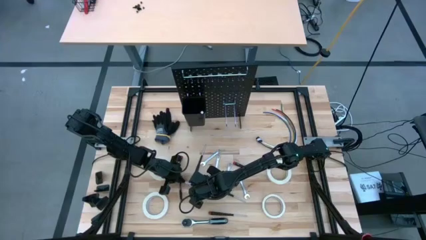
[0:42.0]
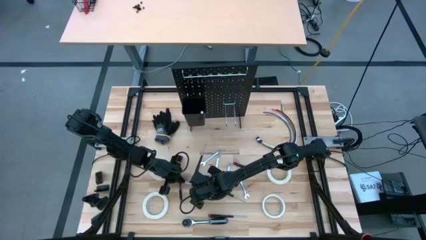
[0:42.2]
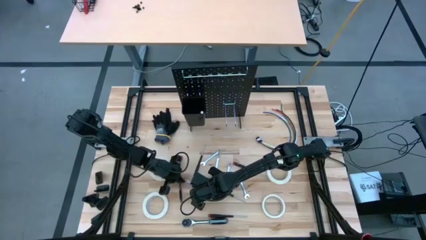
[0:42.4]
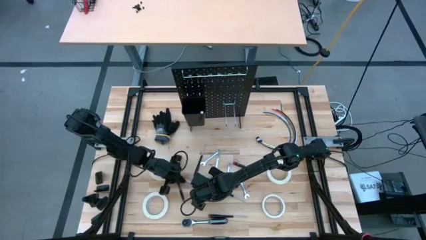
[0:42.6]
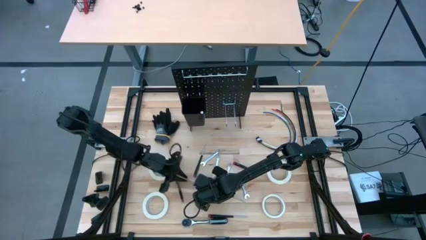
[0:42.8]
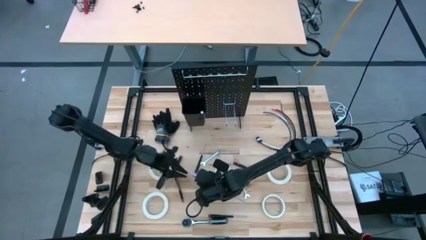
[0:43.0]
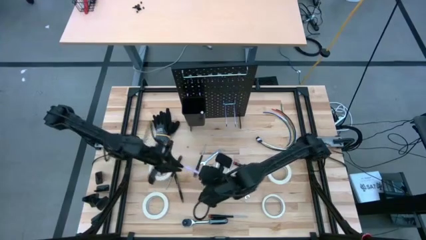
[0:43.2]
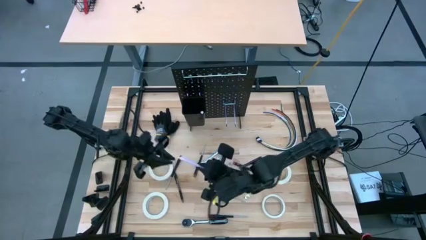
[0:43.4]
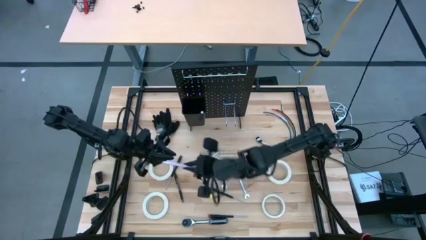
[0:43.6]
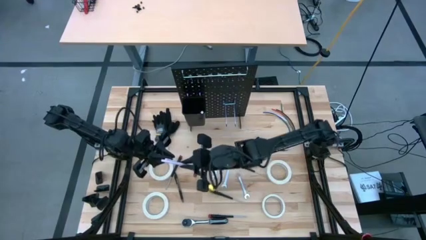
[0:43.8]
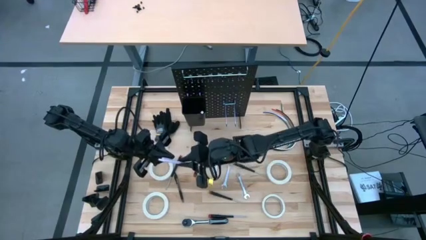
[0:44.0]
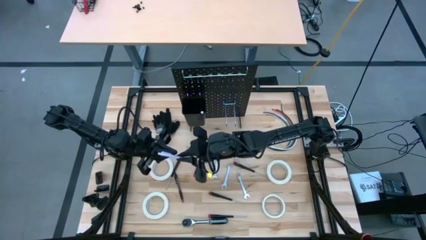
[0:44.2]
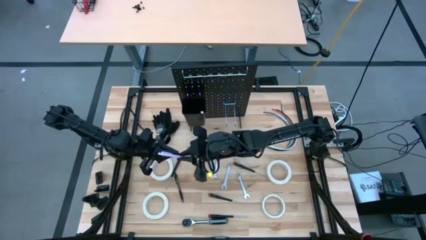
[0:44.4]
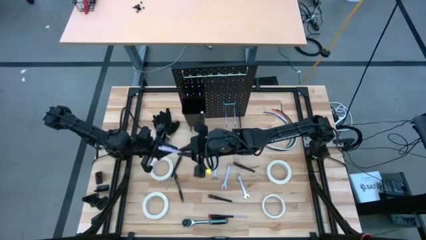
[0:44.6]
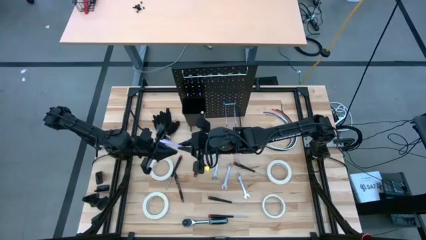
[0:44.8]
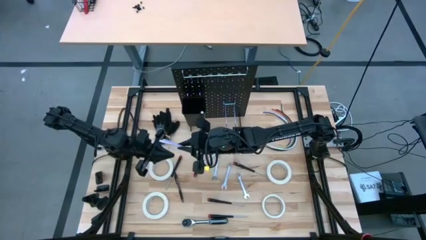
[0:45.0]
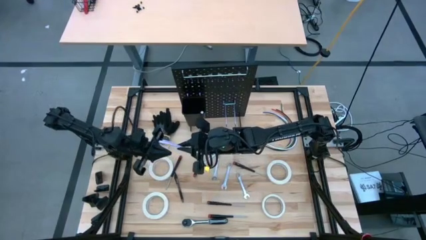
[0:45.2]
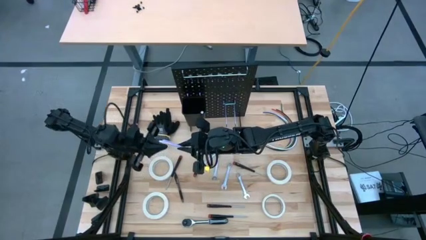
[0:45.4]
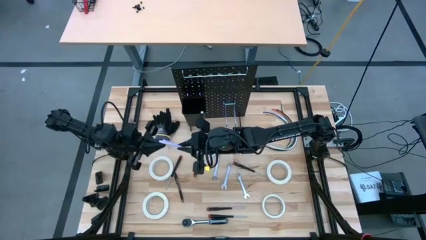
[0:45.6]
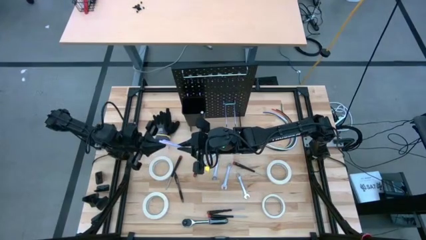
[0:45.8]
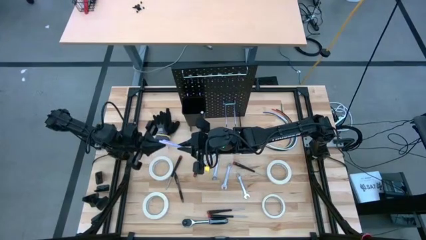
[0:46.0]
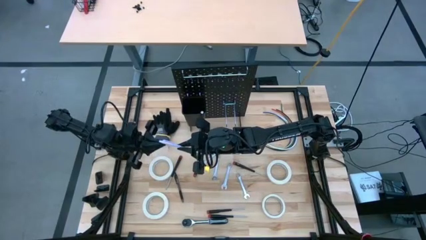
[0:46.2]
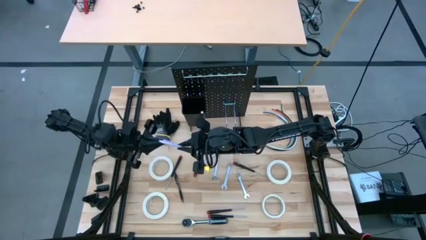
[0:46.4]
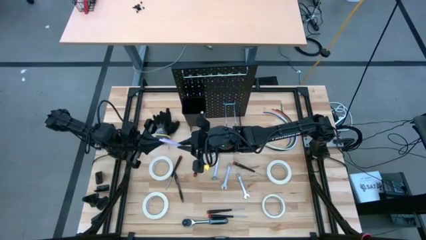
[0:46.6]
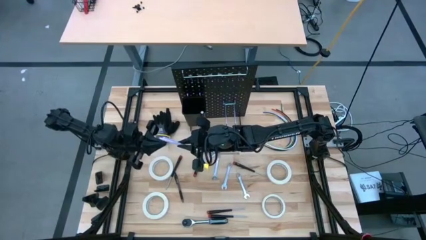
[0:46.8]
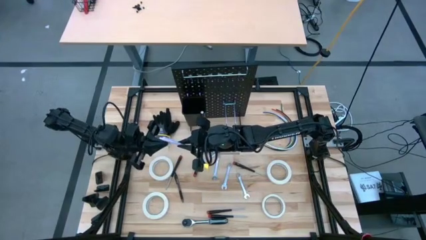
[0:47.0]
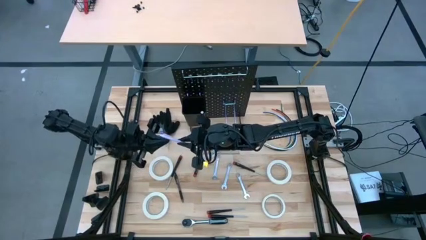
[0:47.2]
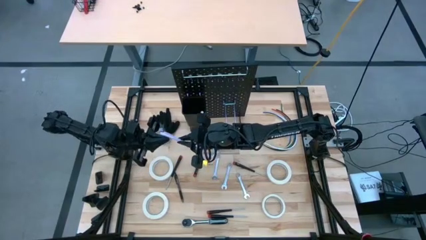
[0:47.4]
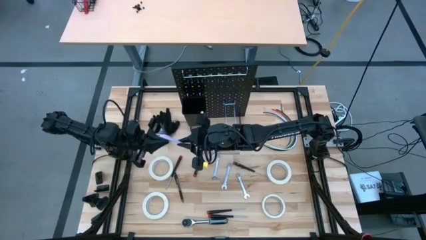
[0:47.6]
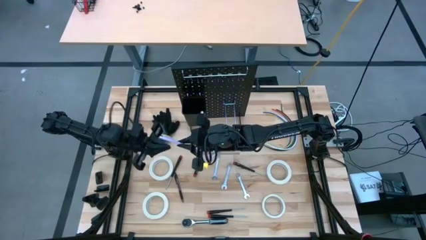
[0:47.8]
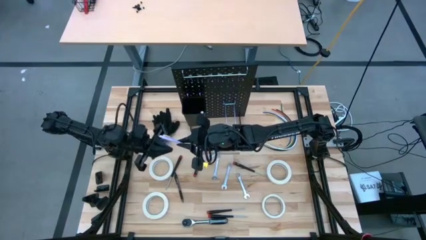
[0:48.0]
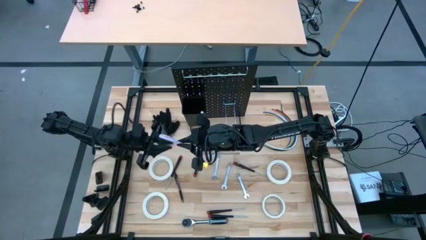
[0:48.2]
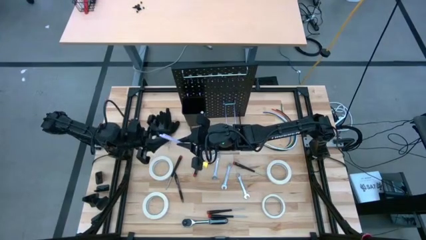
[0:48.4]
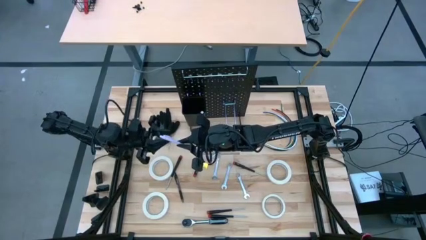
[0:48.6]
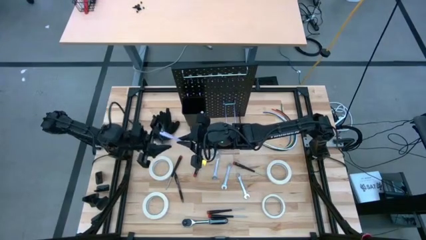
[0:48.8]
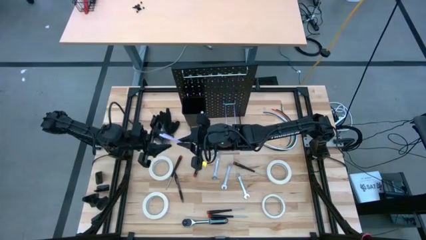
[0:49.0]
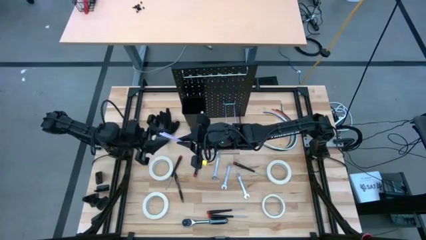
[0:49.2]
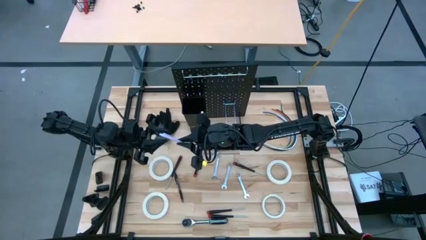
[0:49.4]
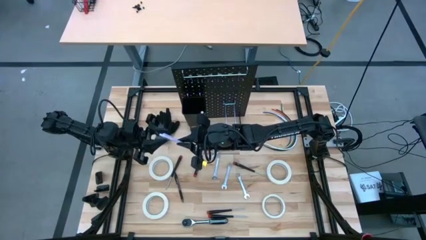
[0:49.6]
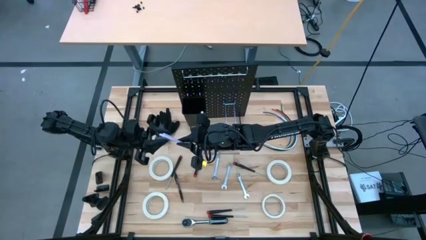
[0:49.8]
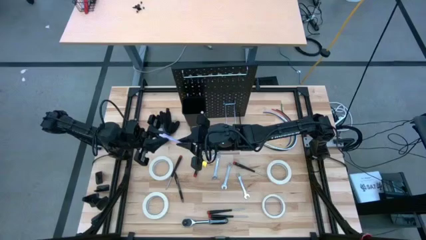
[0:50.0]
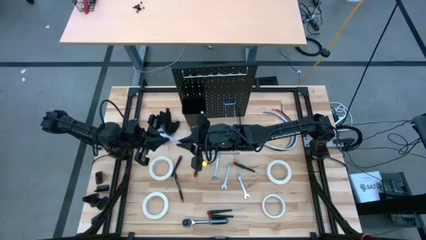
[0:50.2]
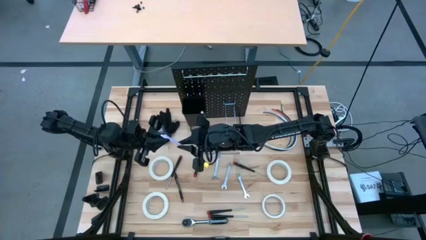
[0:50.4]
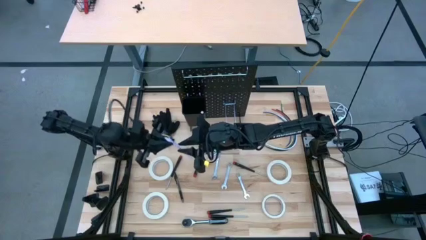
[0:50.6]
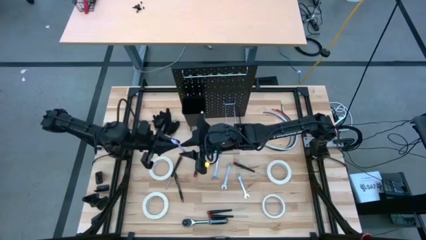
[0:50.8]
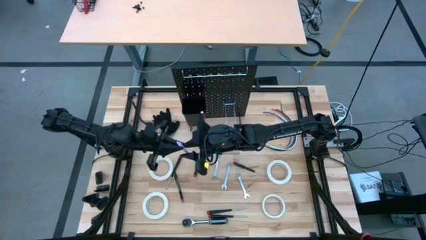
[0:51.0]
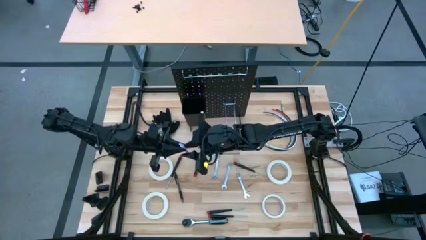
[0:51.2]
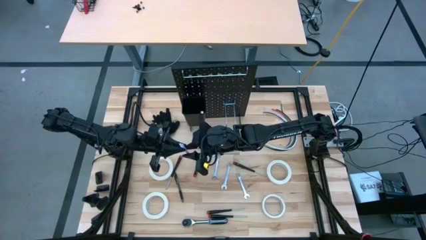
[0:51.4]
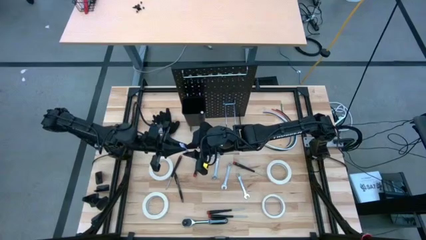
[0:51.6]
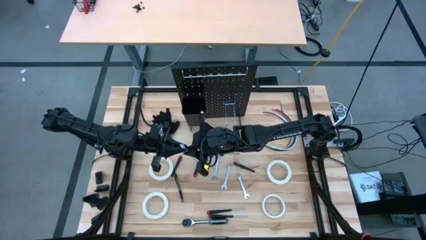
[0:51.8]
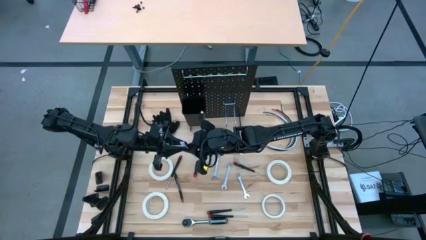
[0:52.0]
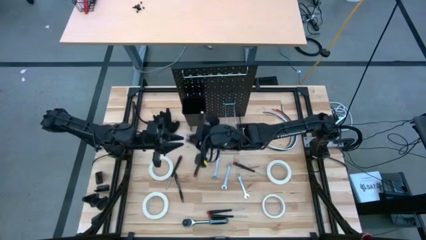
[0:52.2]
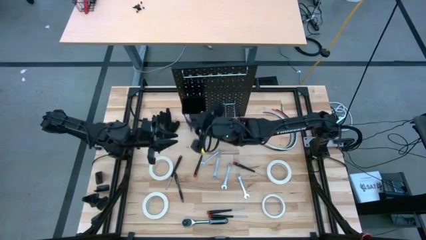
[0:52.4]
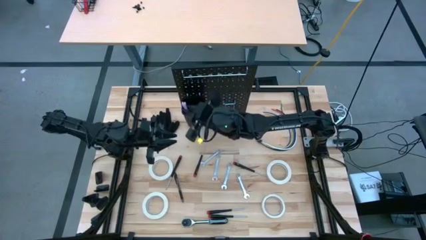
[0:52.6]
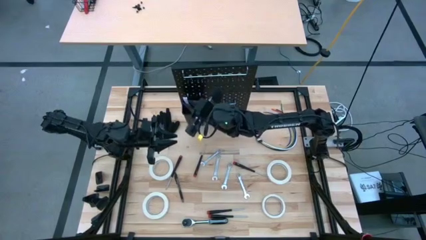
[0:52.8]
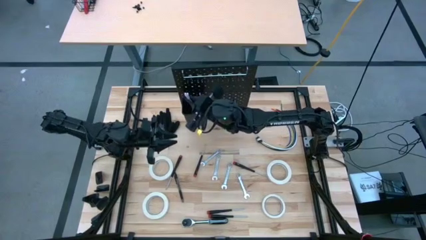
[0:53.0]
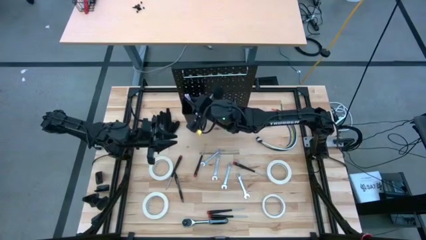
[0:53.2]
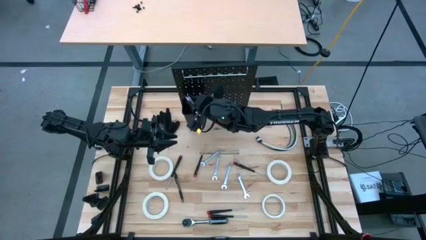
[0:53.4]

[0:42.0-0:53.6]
Task: Hang tools onto peg board
Put the purple pen into the black bin on the peg board
